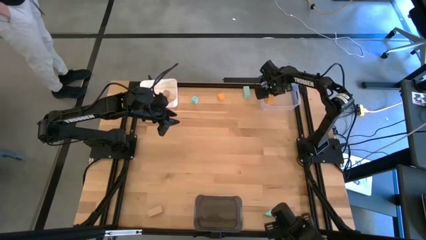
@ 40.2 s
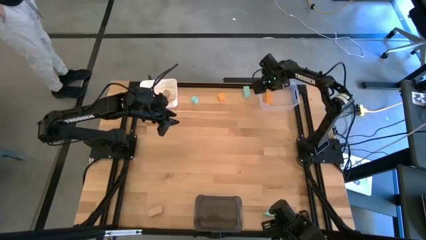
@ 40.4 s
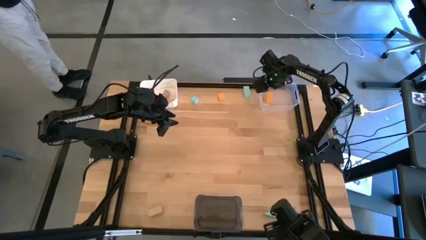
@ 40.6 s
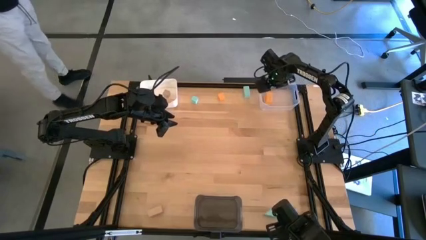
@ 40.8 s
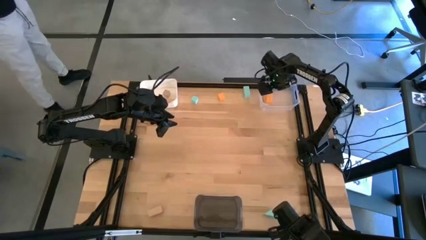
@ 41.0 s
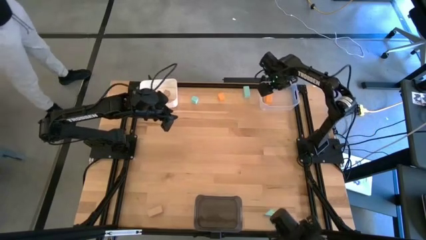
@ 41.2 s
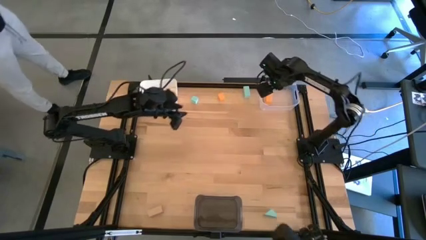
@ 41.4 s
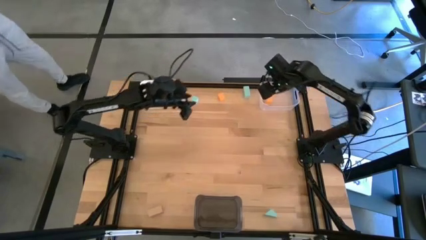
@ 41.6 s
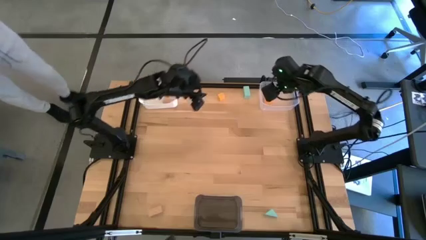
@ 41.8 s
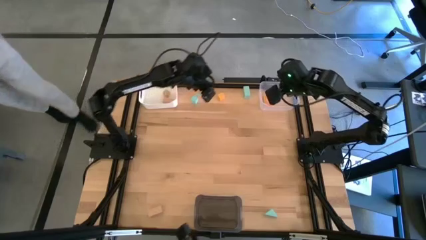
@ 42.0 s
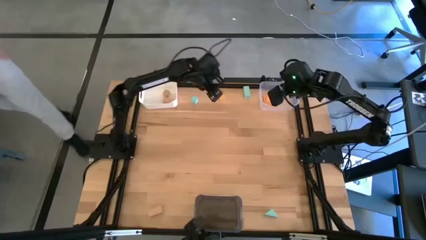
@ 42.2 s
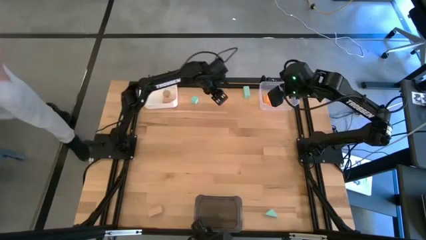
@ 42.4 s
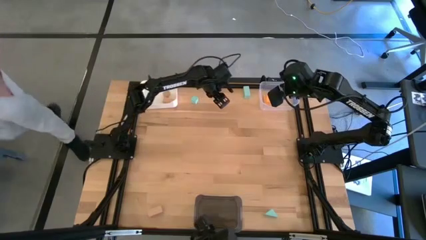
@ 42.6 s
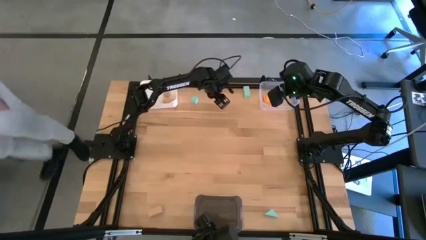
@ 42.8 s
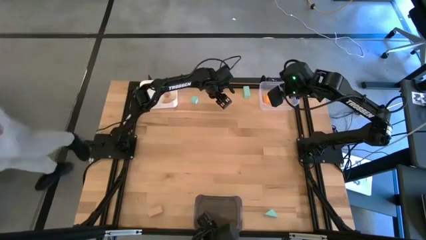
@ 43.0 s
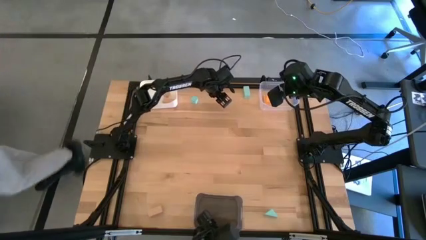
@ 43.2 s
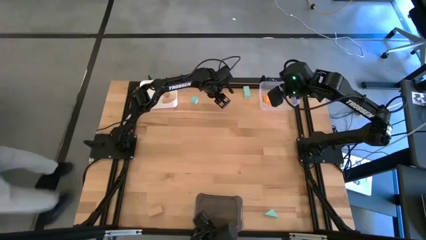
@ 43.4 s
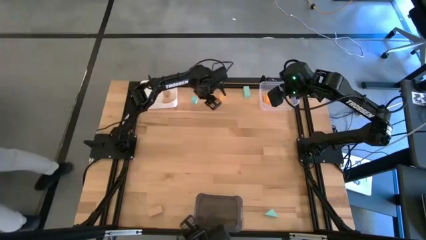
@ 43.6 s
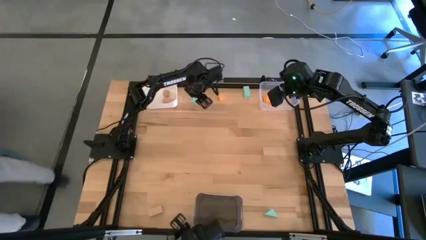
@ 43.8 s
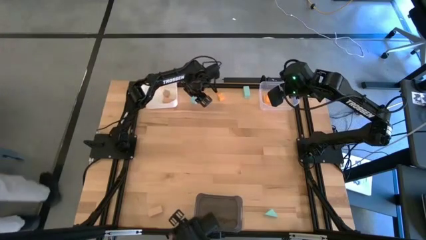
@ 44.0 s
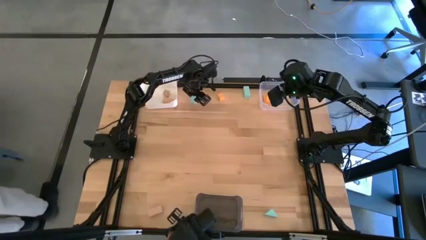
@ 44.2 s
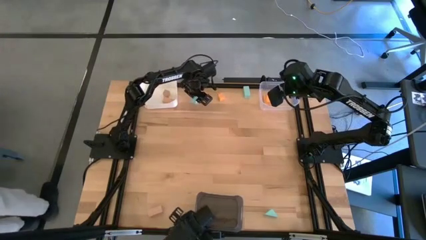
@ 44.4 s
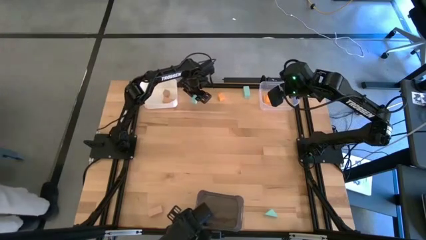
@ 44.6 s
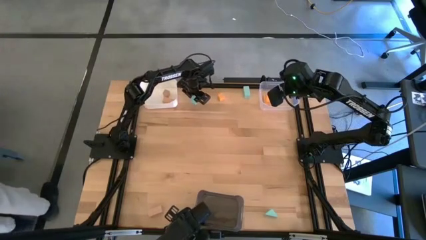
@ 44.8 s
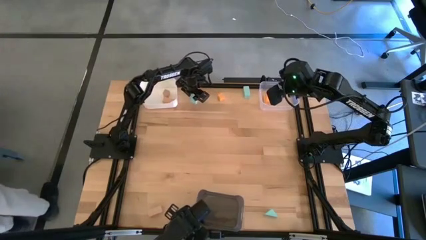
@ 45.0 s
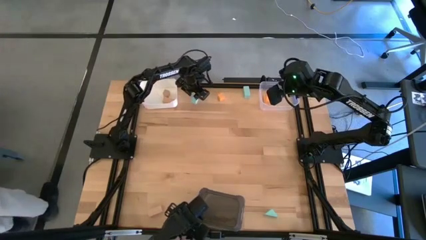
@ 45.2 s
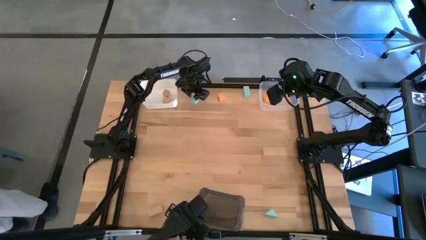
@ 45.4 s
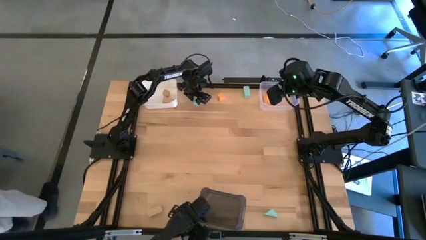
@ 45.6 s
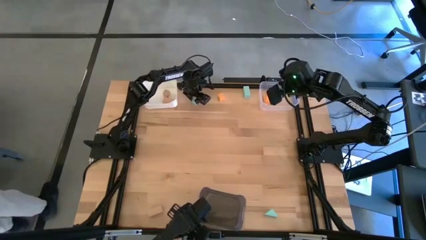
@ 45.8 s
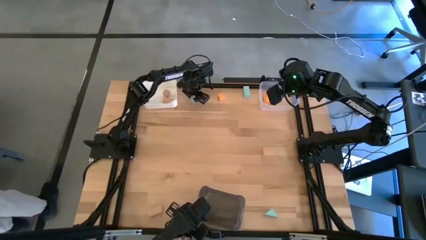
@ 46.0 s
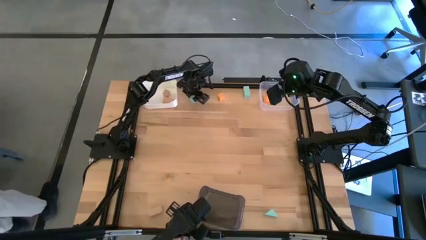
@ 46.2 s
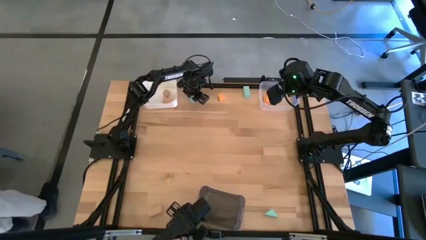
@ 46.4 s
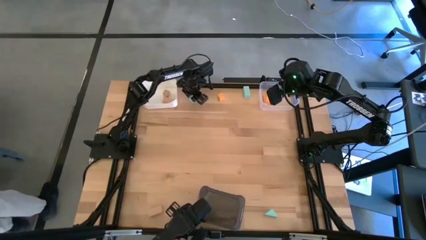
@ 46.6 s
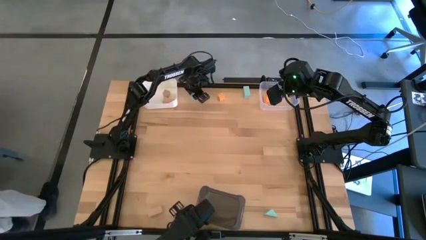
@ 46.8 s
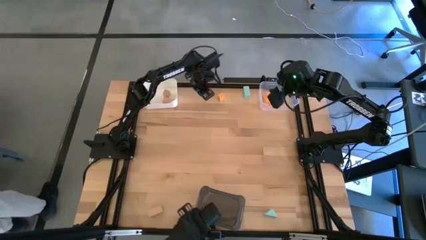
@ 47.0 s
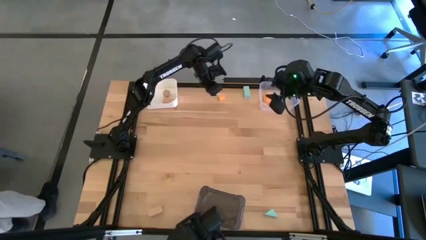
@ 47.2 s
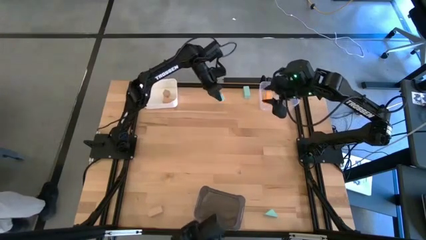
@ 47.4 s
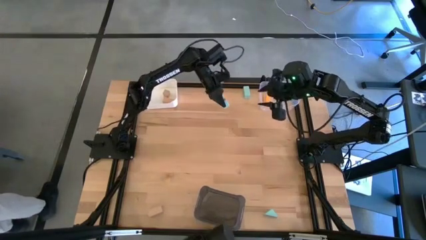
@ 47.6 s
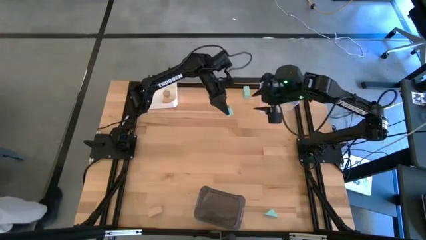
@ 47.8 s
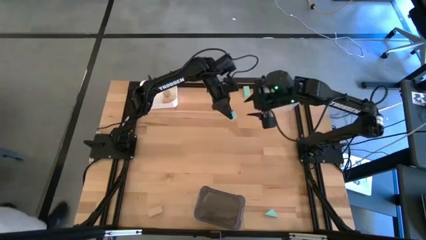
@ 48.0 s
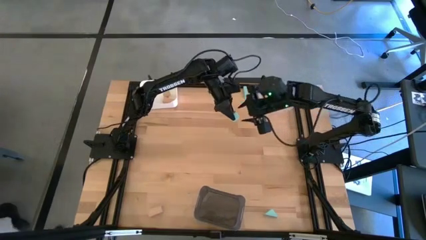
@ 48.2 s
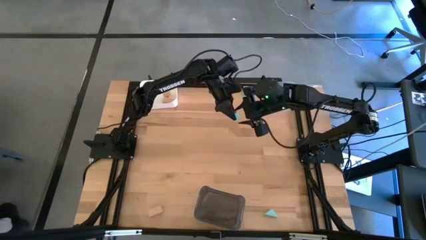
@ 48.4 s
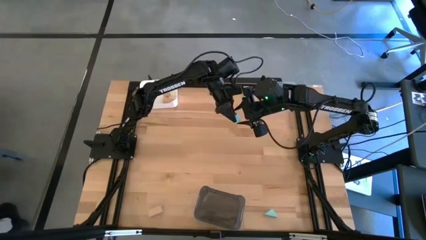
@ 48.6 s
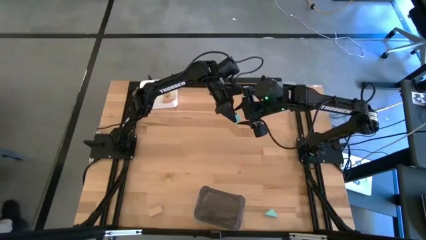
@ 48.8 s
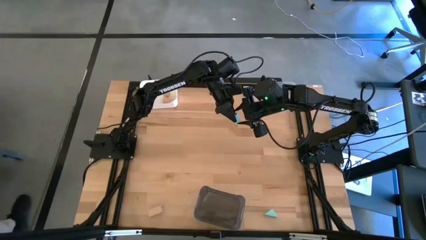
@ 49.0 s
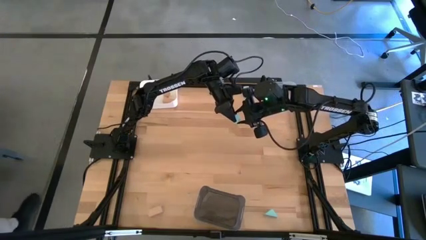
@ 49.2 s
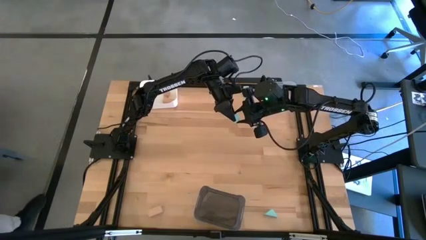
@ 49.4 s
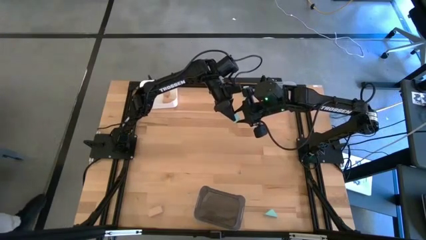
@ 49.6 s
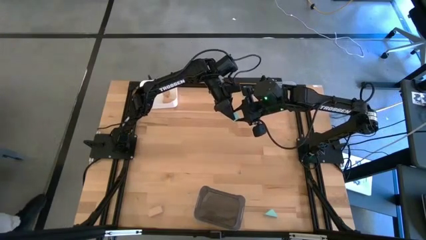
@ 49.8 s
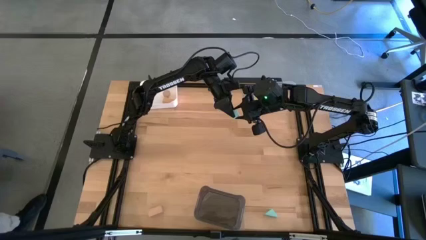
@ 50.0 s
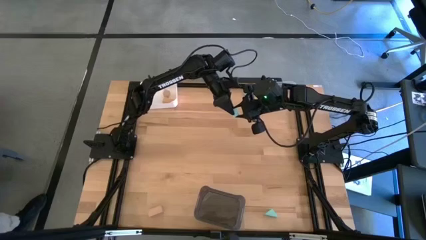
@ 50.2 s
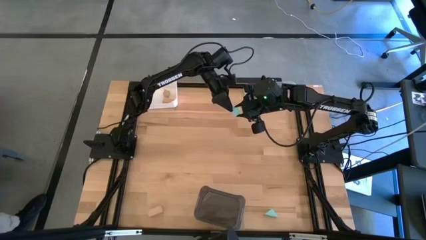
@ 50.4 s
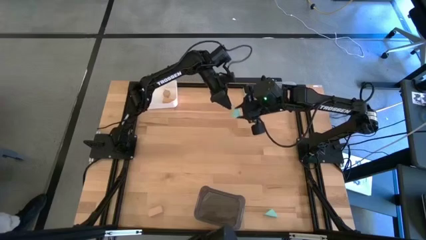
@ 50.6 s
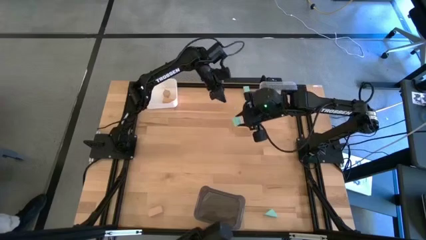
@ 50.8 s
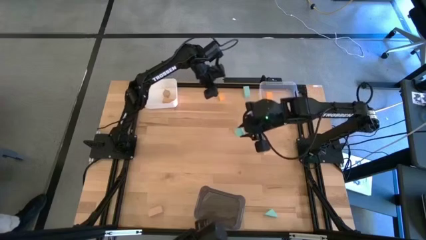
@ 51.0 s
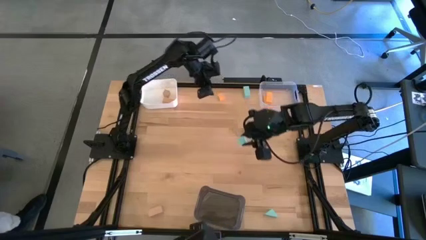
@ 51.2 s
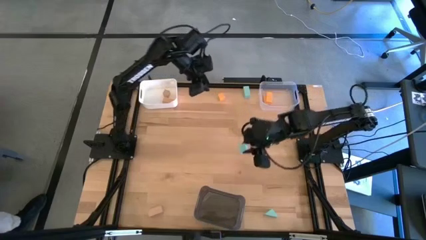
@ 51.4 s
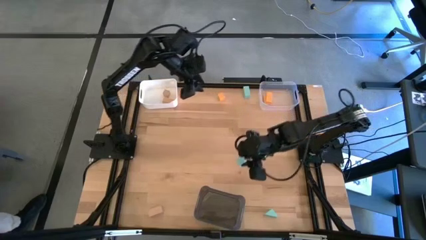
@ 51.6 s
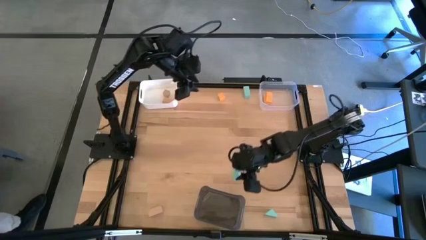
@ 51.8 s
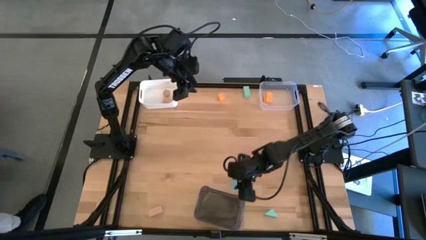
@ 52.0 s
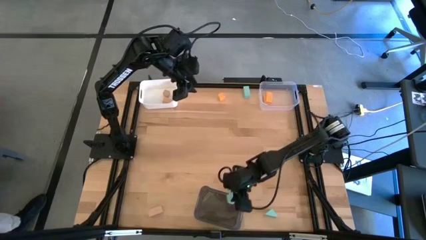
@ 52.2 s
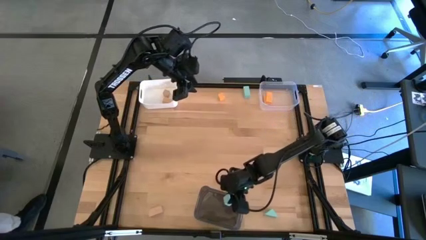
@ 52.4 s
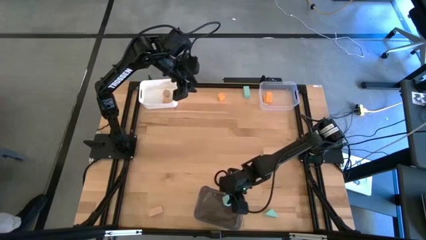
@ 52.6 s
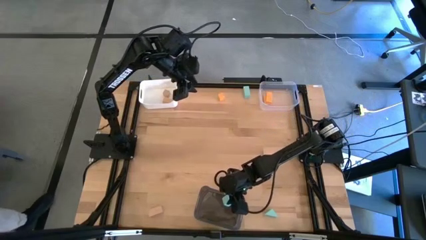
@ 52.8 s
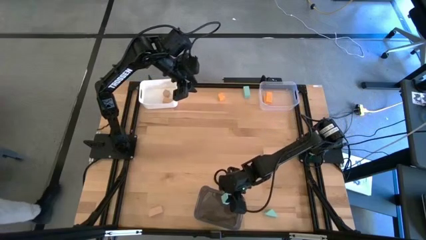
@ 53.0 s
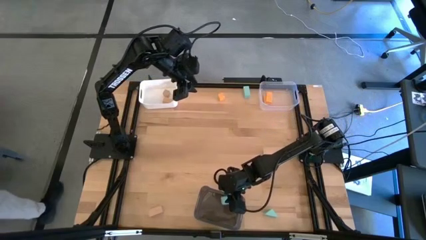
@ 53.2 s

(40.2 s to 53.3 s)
Task: Sort & place blocks by color
Put the top right blue block into the black bin
